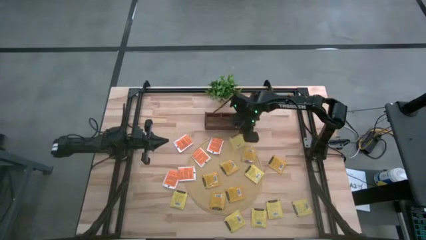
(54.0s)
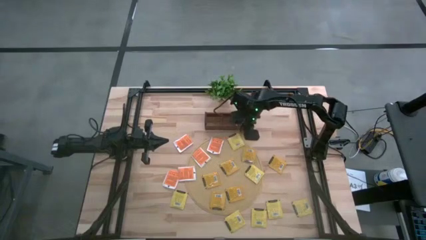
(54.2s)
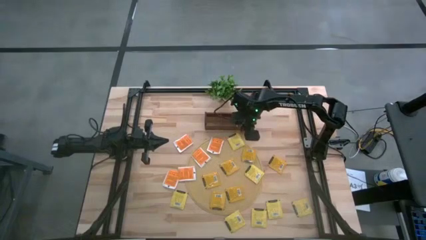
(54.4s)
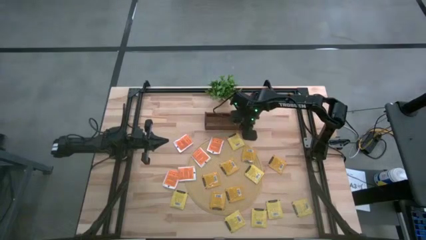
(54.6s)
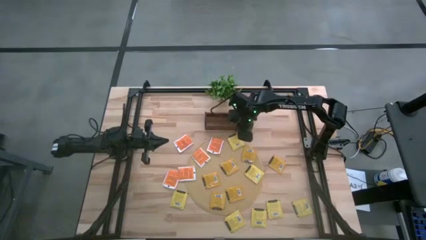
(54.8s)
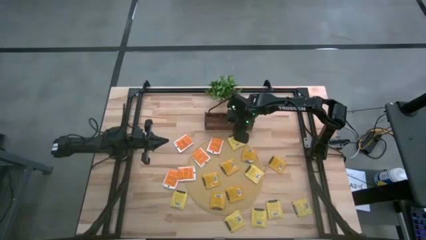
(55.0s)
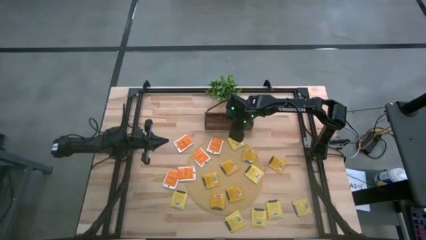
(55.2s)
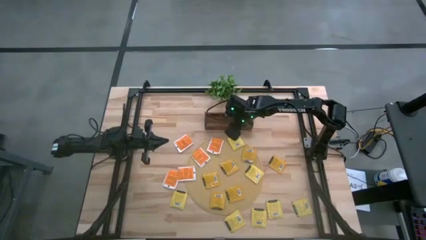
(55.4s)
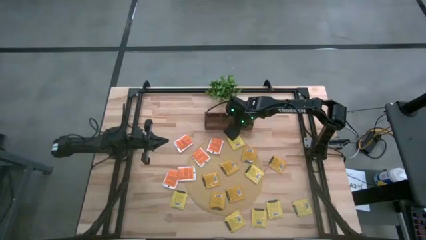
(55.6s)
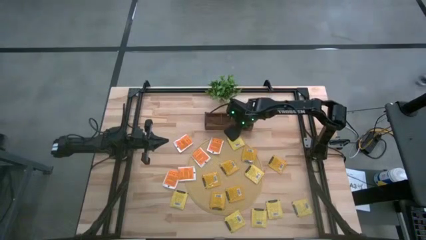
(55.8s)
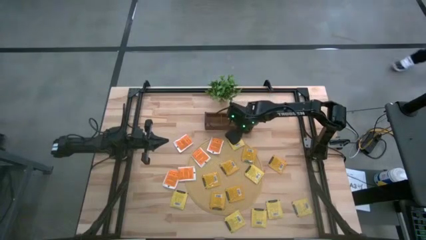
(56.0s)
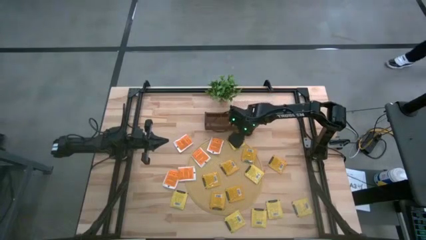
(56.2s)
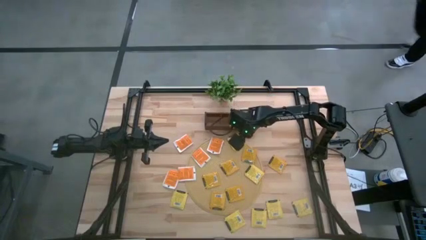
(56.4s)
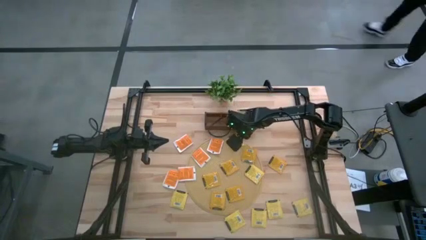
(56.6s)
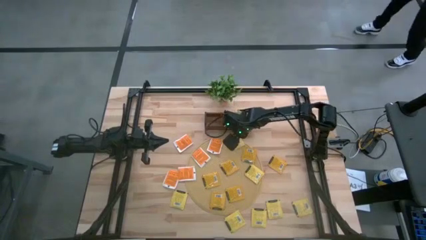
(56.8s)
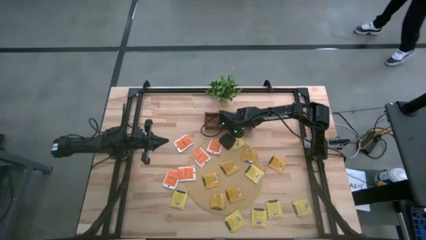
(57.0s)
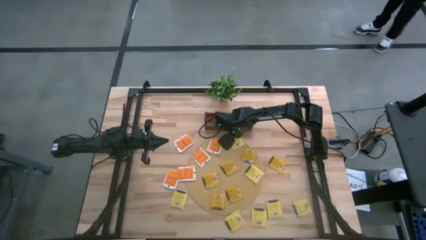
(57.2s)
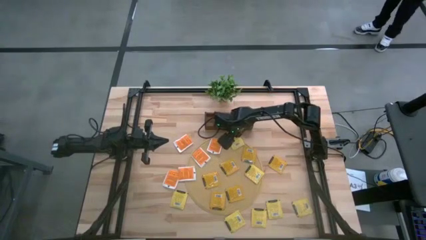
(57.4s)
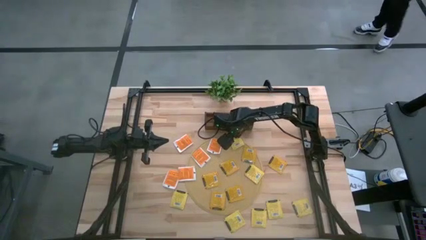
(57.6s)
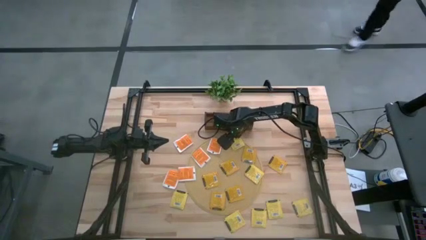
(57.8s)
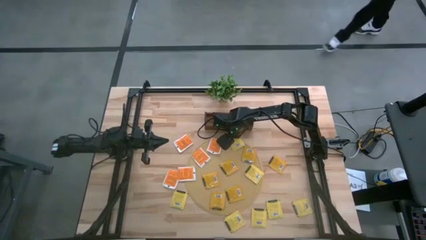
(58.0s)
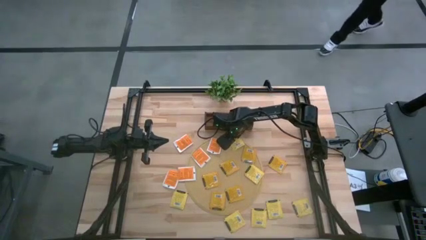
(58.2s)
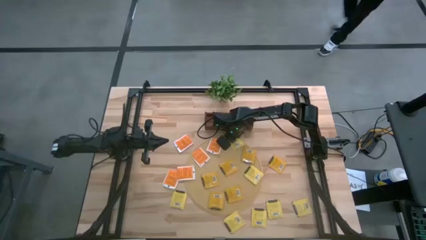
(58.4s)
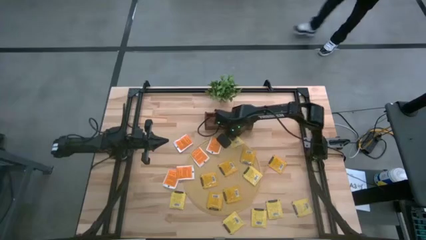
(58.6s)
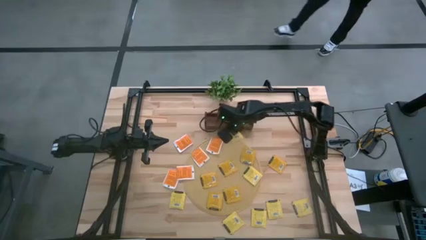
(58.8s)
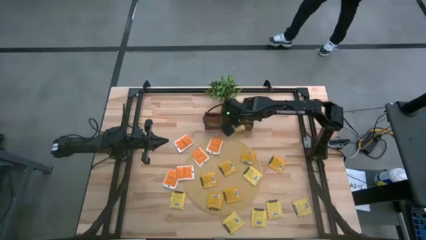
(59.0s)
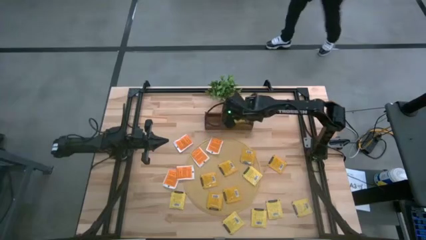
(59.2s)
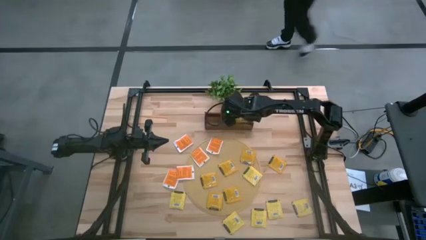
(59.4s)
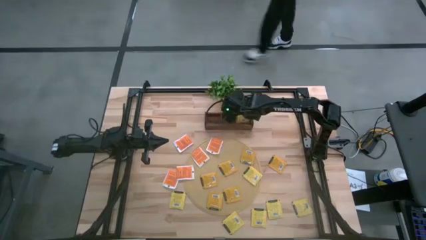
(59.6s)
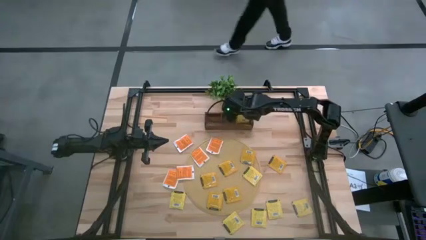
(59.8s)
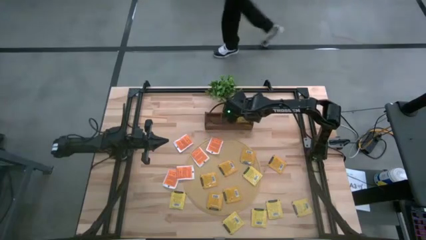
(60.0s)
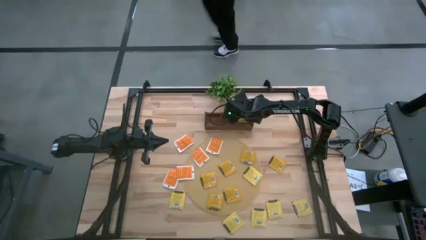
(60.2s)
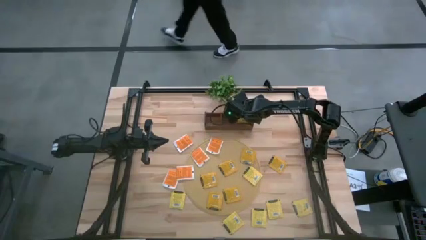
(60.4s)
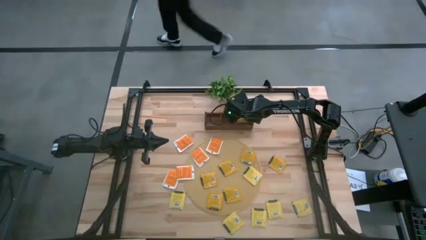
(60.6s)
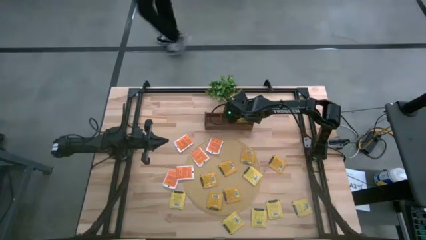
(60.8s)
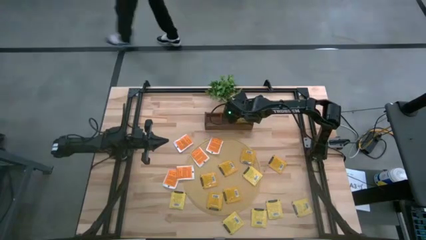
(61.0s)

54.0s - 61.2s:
Task: Pick & Place Tea
Put the yellow tea bag into the right section of the wooden organizer

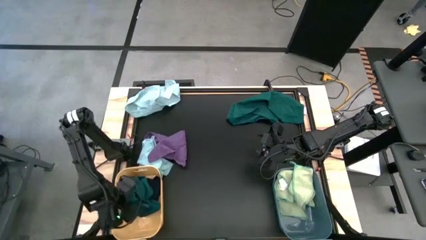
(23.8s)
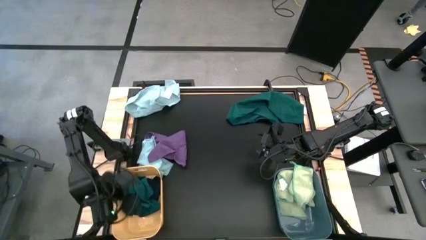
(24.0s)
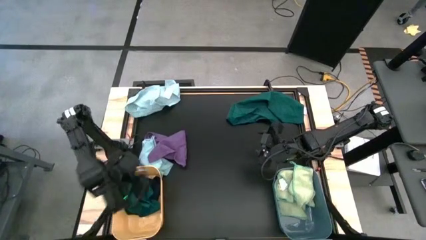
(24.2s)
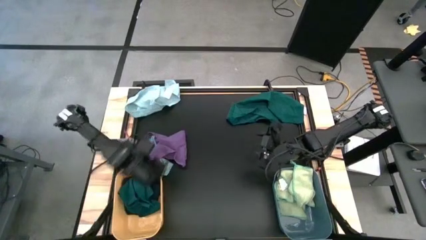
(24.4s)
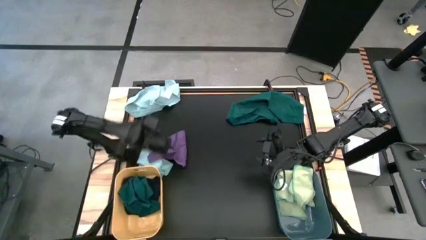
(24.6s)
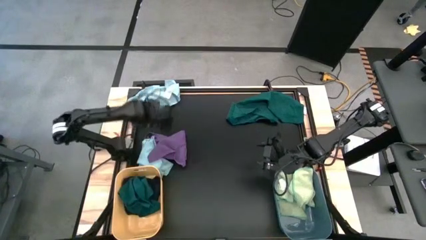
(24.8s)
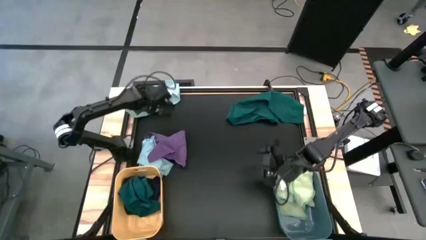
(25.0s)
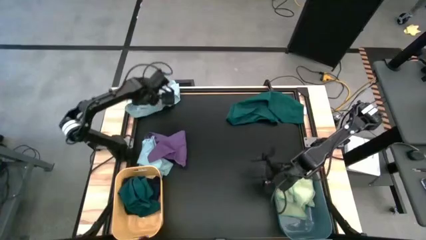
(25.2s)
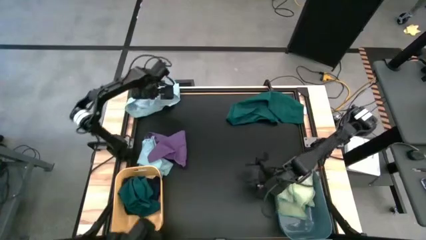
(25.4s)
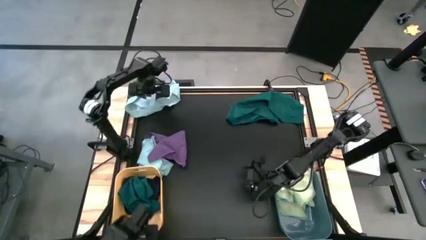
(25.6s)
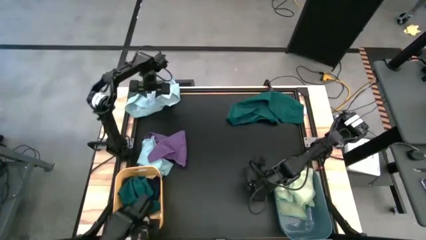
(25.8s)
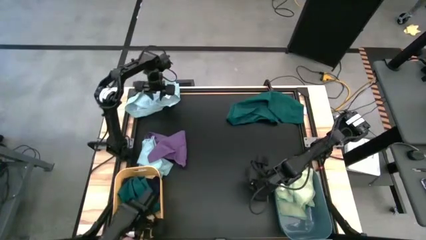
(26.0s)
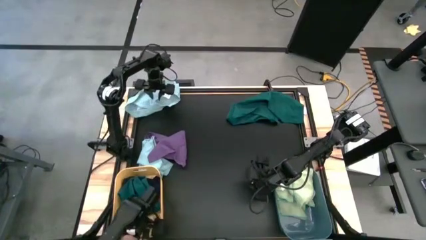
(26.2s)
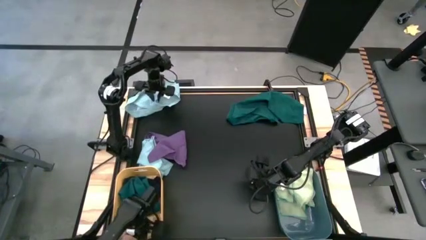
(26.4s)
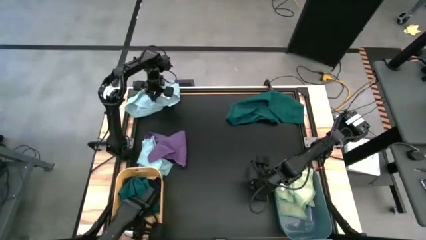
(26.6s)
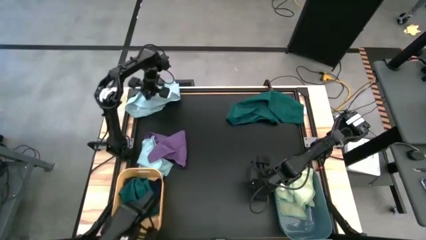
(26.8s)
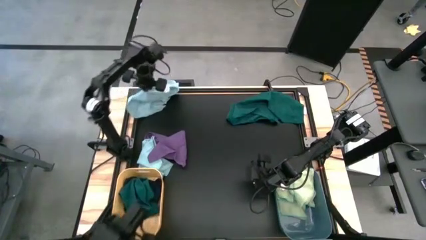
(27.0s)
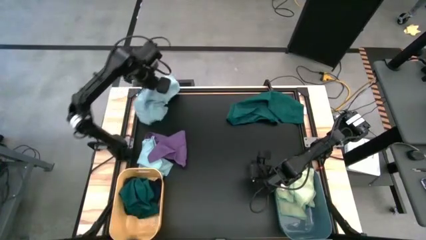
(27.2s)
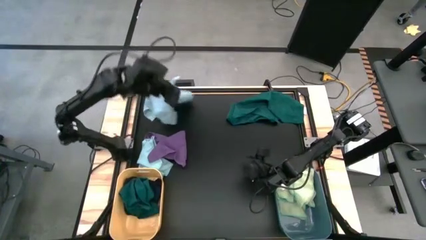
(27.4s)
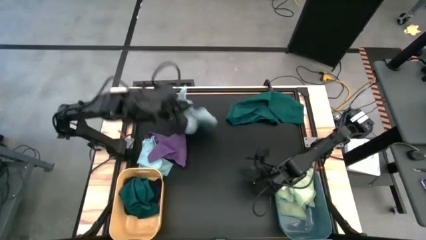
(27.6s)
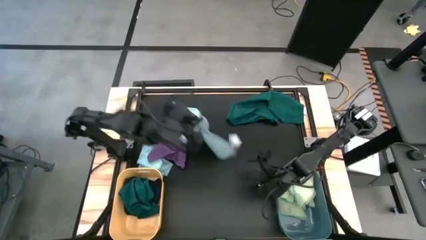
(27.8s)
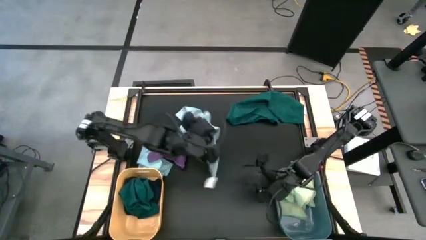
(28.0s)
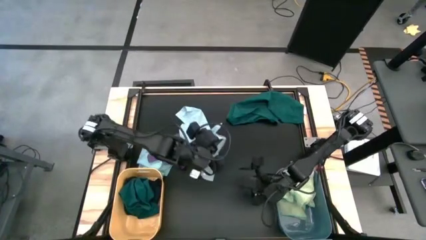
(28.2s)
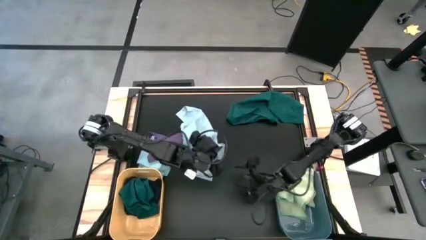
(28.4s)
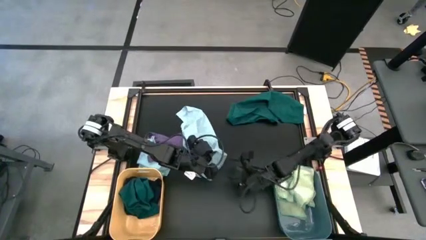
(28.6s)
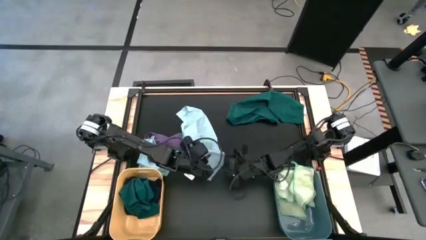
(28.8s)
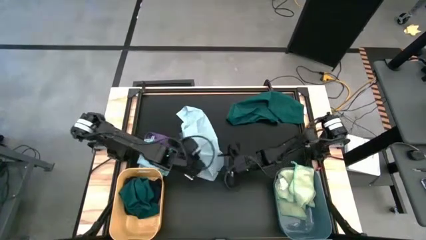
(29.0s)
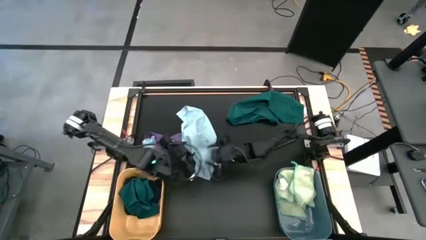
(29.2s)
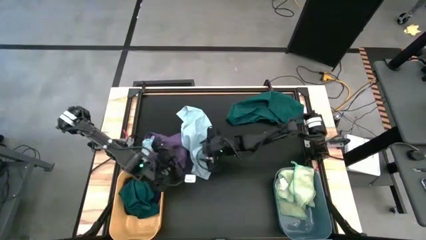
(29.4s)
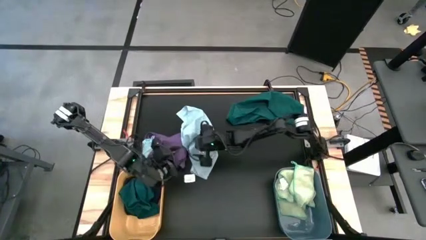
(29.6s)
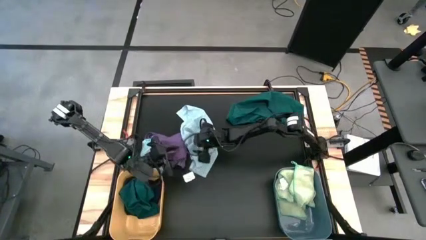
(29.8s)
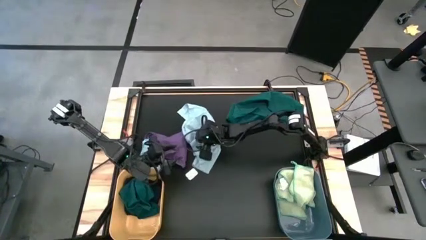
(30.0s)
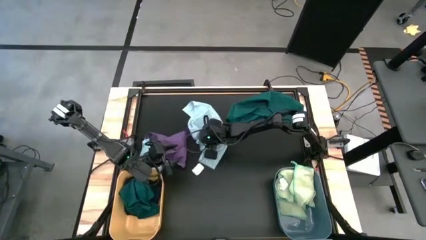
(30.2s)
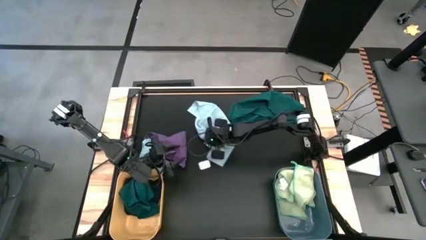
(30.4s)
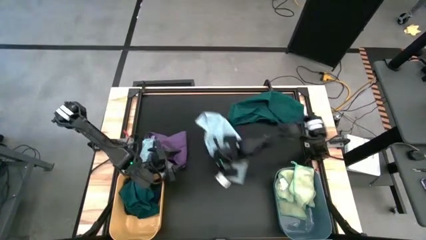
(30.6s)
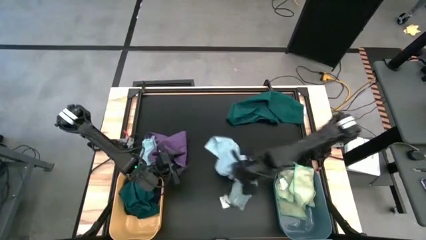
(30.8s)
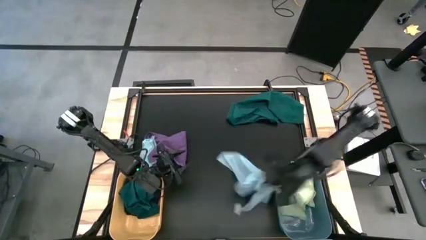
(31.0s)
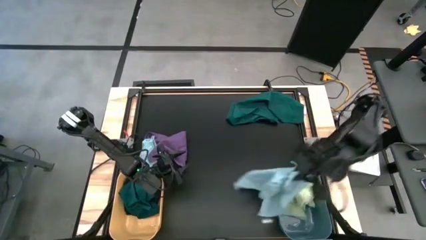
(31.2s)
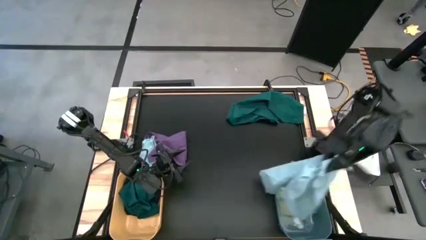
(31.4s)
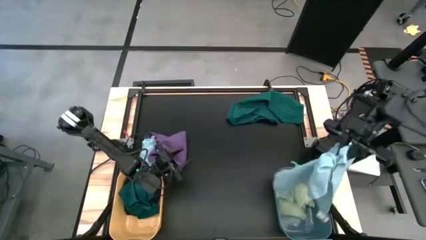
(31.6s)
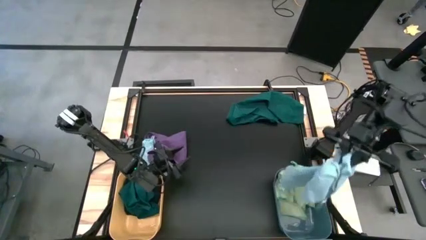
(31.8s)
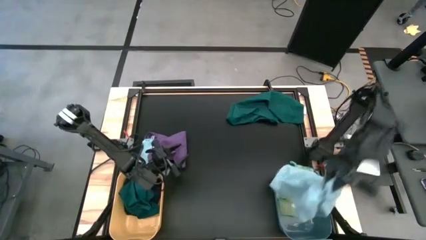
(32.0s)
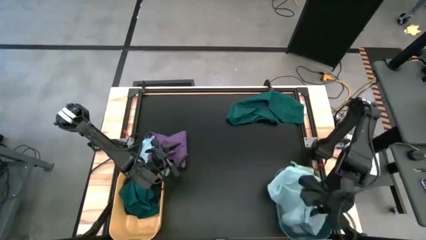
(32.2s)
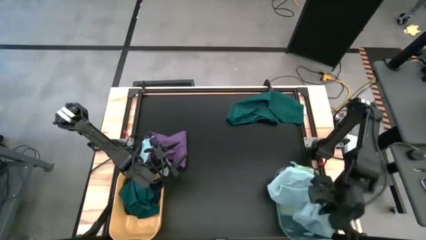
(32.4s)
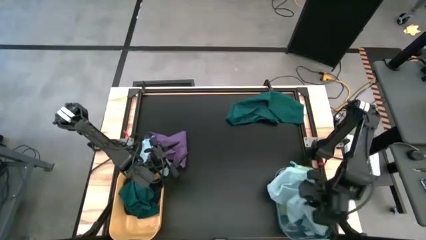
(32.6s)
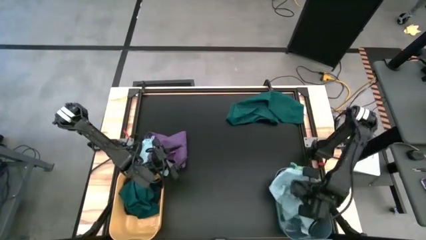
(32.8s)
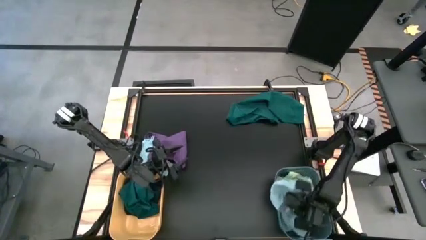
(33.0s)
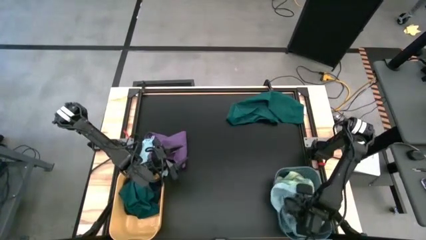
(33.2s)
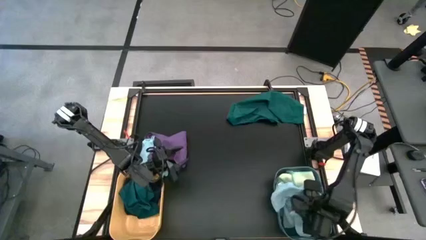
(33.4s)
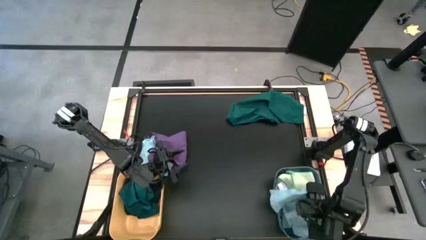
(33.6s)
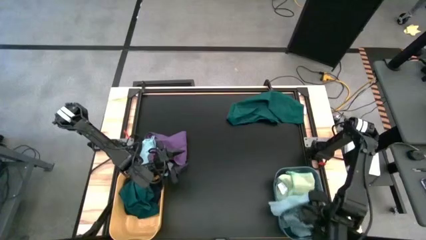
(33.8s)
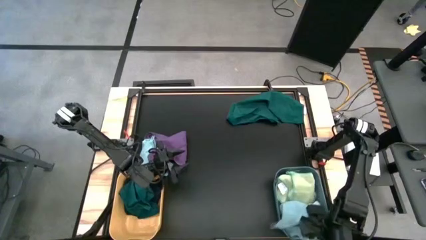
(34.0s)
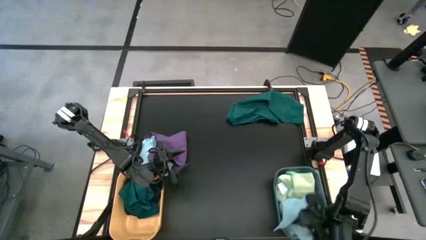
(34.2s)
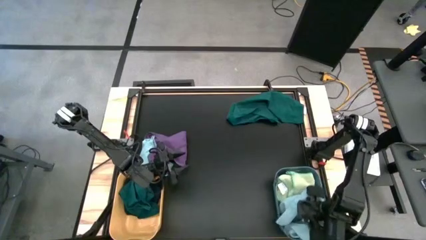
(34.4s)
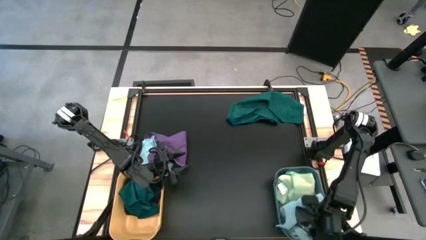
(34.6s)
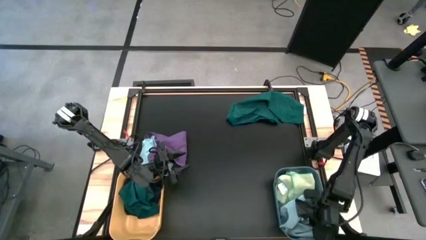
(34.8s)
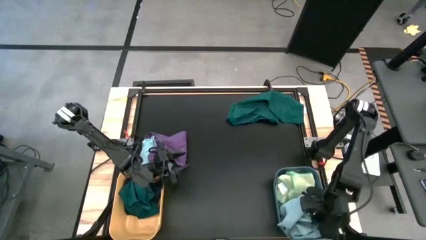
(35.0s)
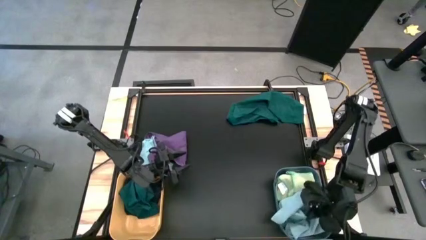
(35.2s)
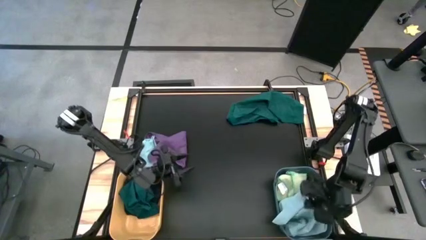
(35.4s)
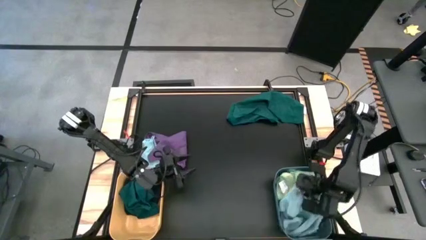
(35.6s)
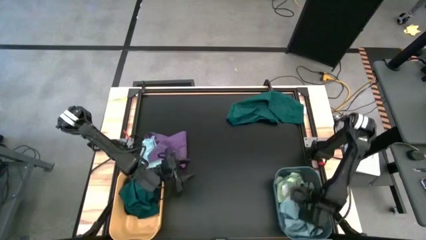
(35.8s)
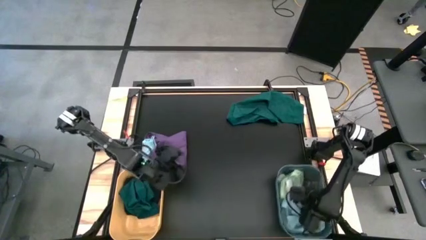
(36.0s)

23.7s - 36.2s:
Task: Sort microfiber towel by color & place in baskets
Put the top light blue microfiber towel into the blue bin
